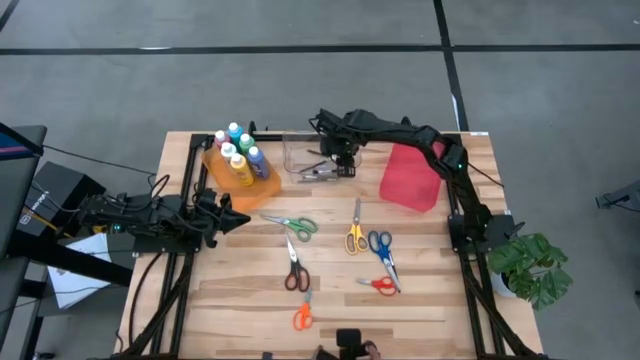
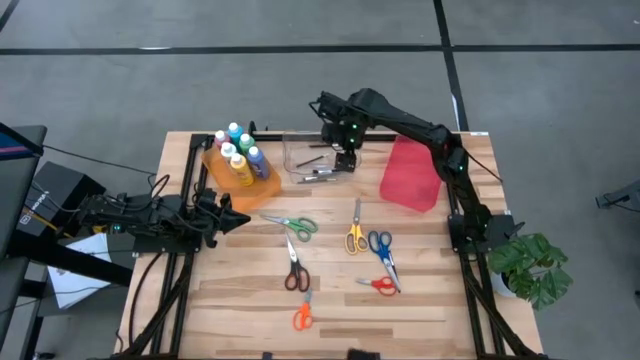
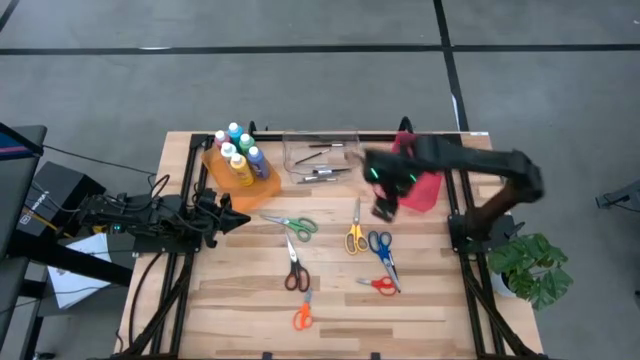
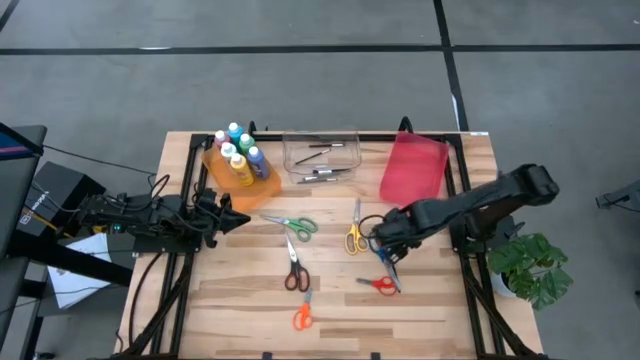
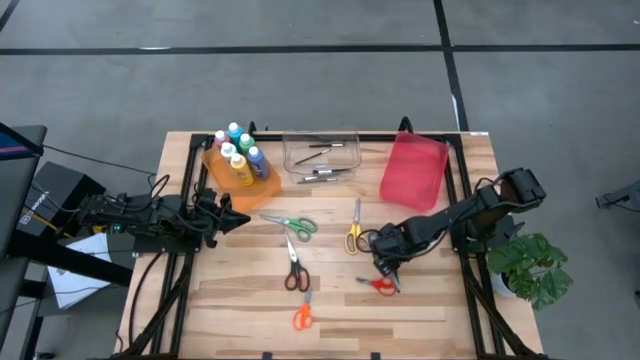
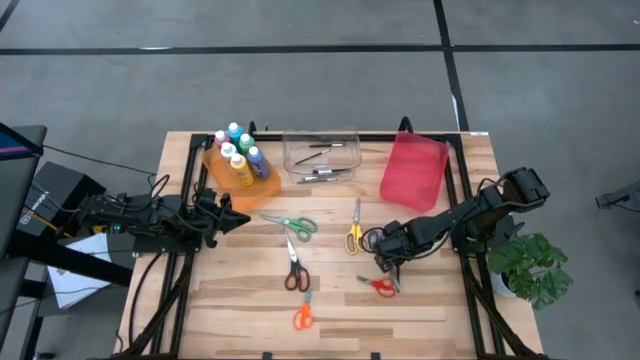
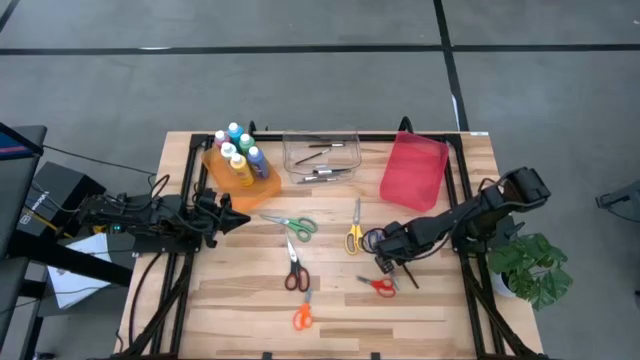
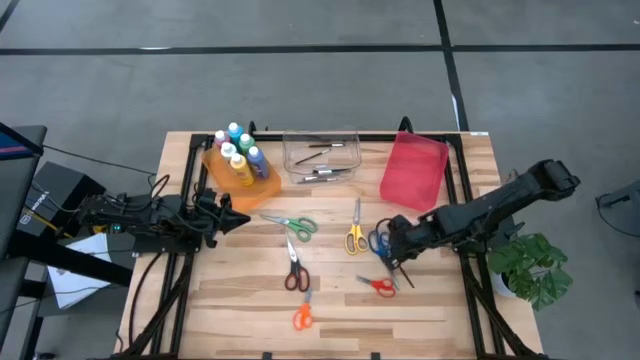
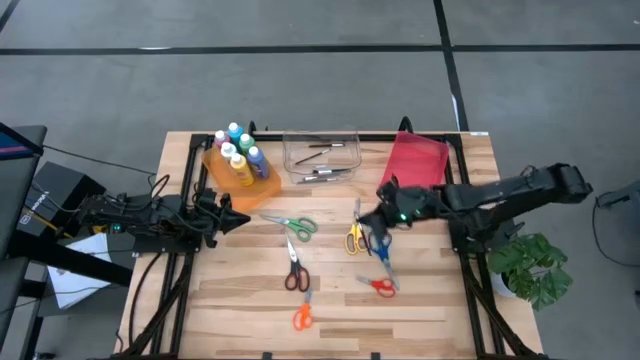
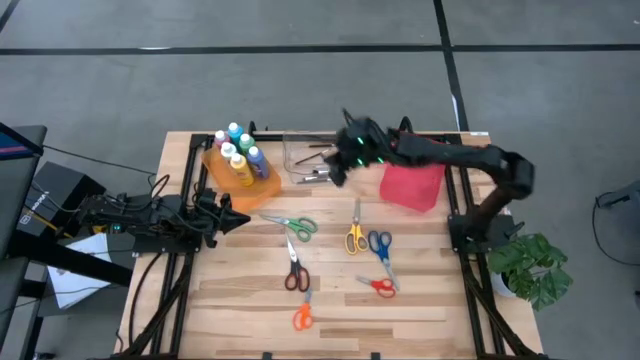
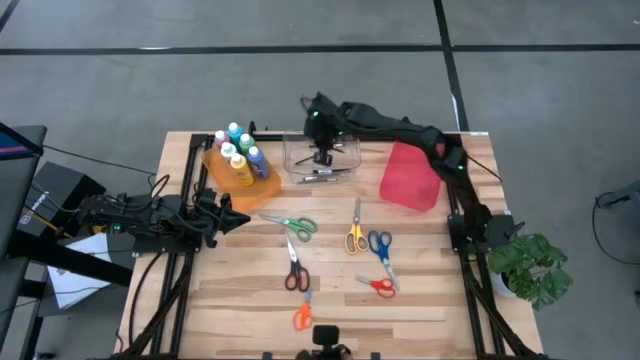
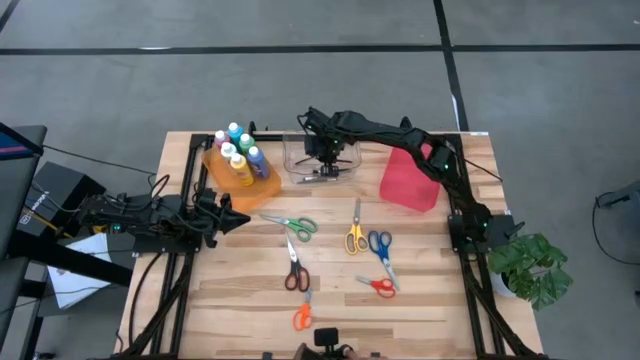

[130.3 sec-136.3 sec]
Task: Pick & Place Paint Supplies
Put the brush into the transparent container

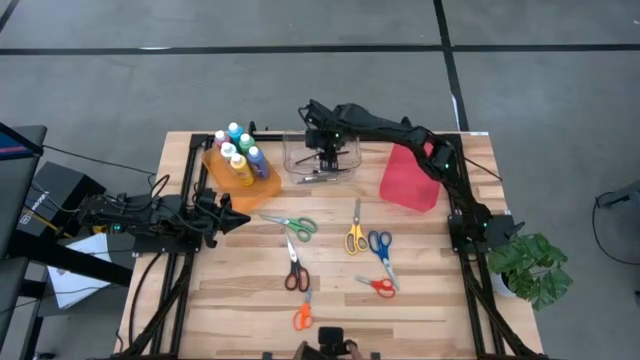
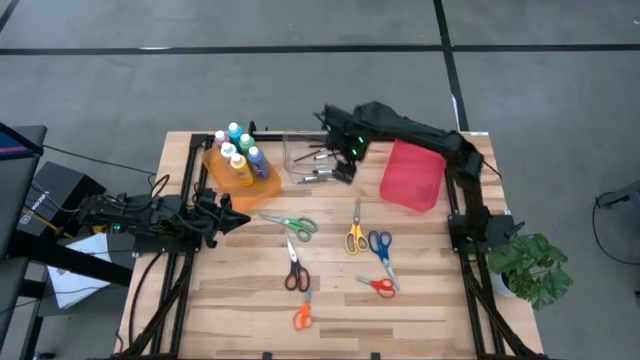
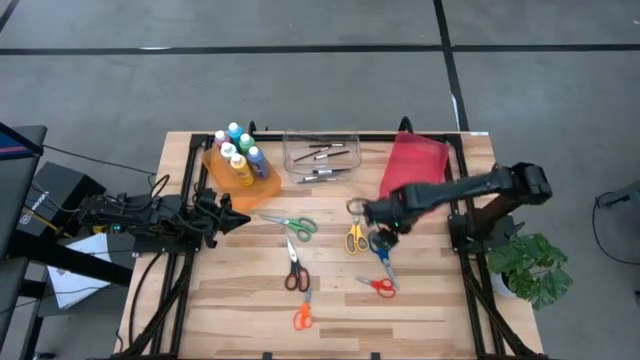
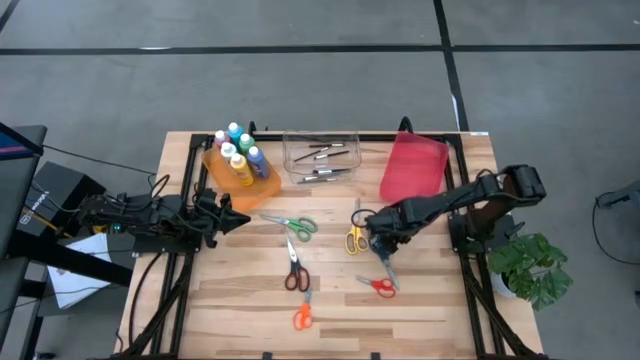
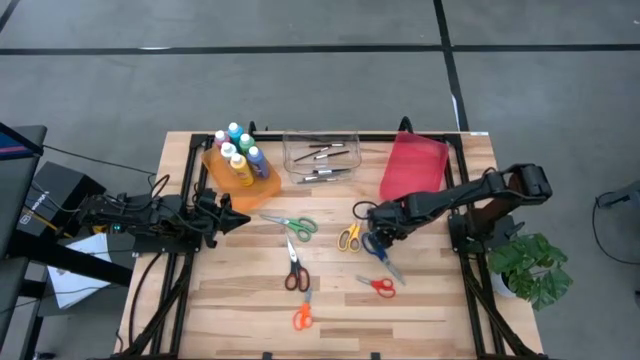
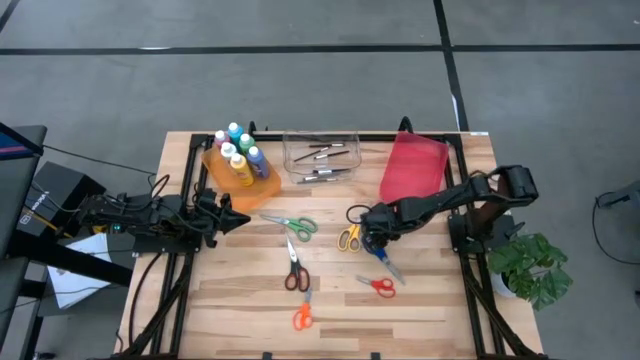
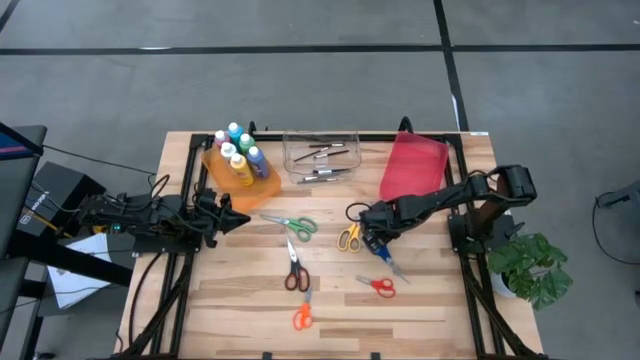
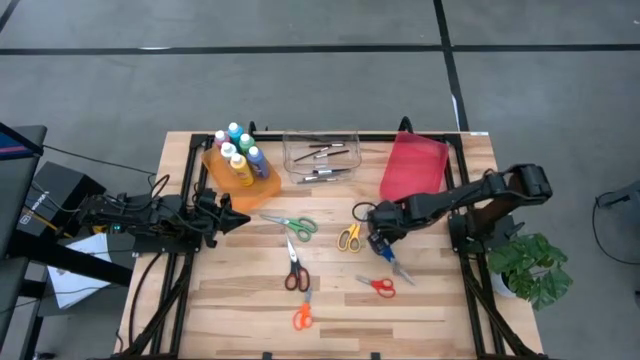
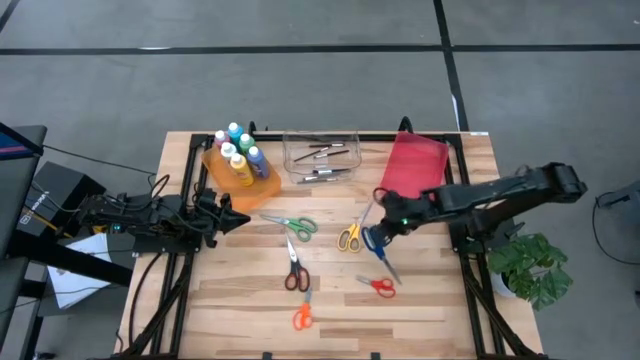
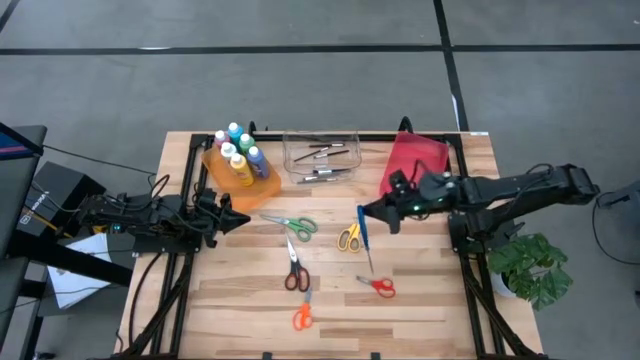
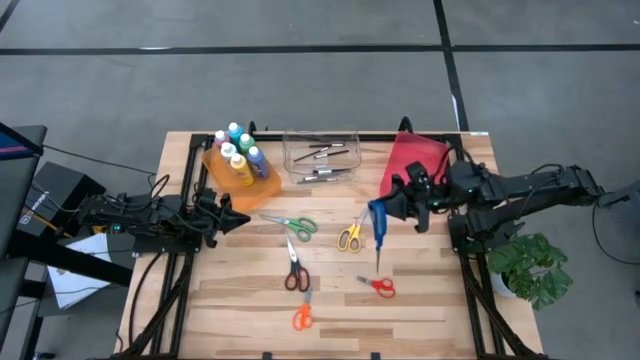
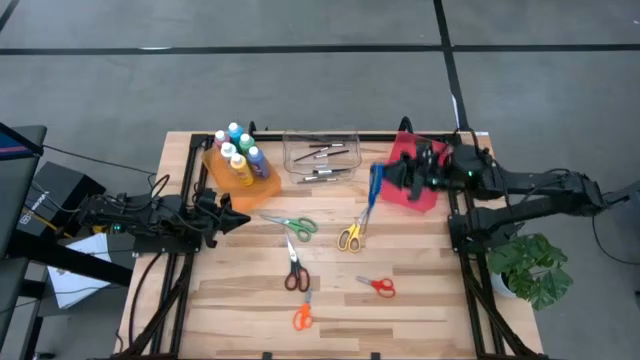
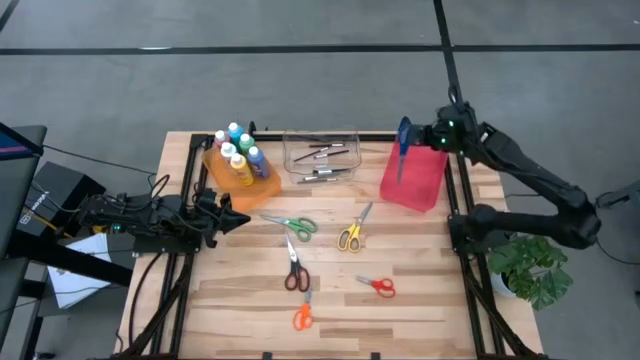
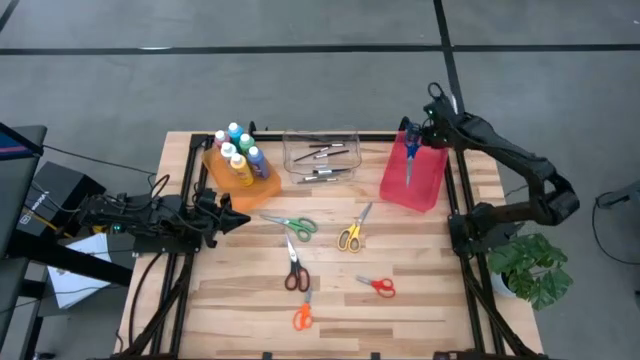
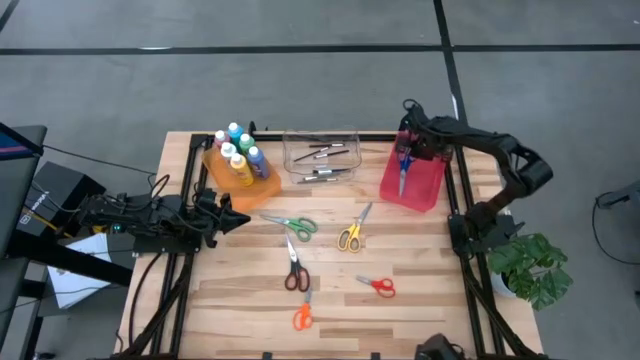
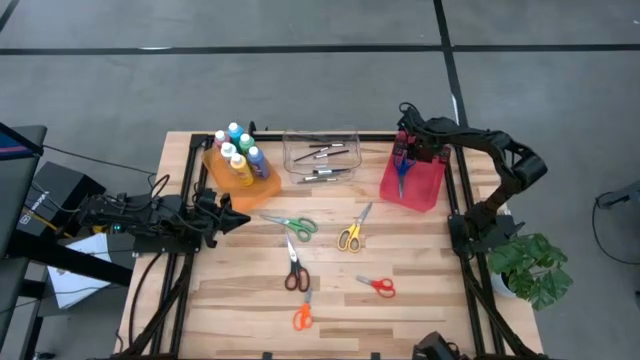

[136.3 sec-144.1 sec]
Put the blue scissor into the red bin

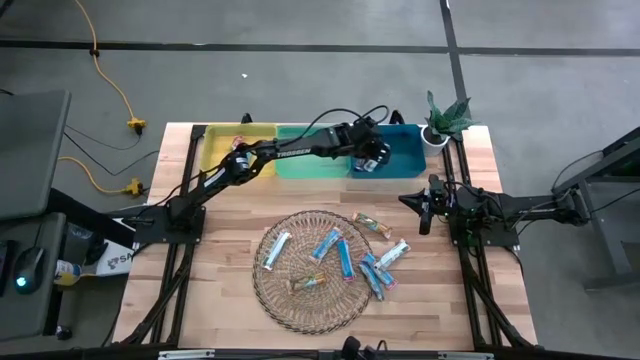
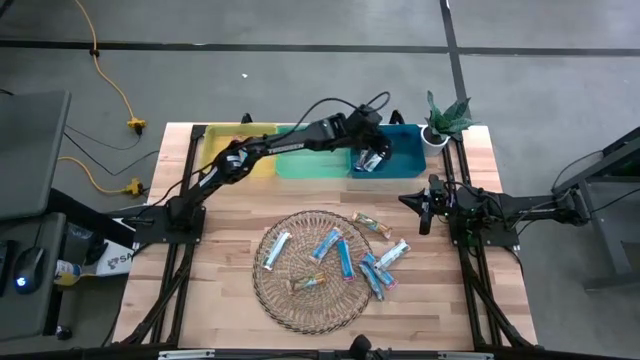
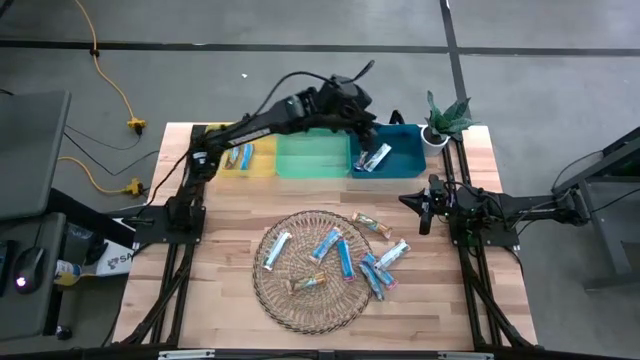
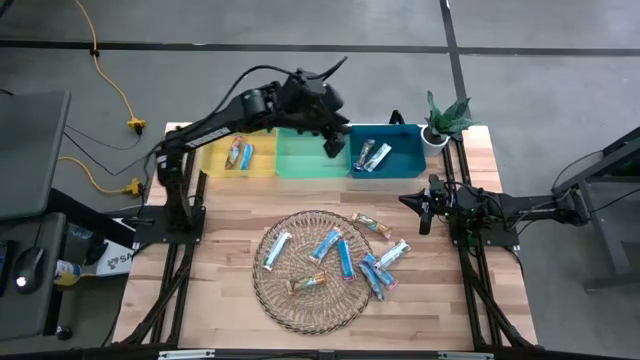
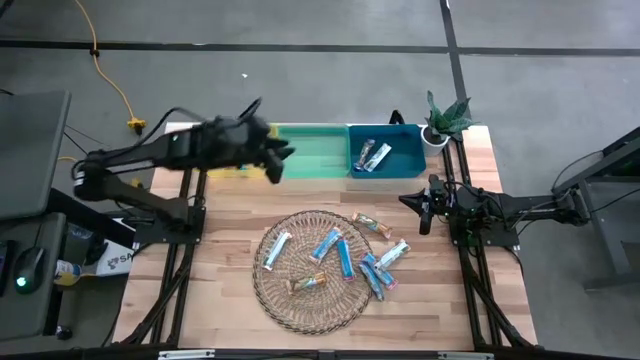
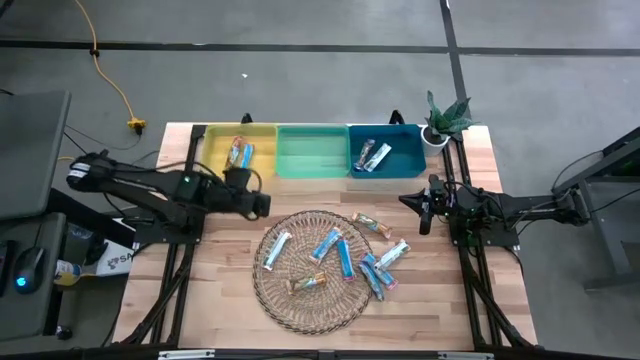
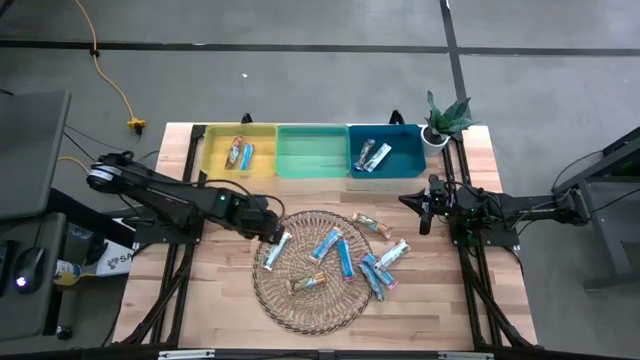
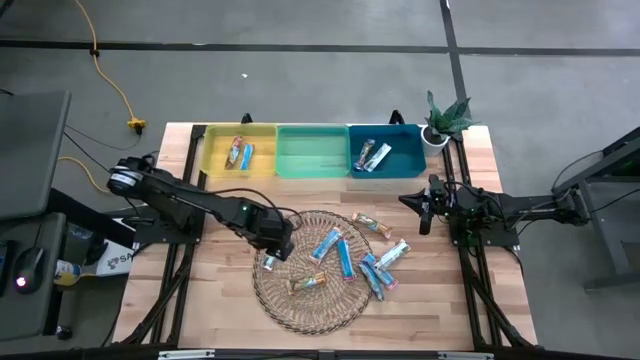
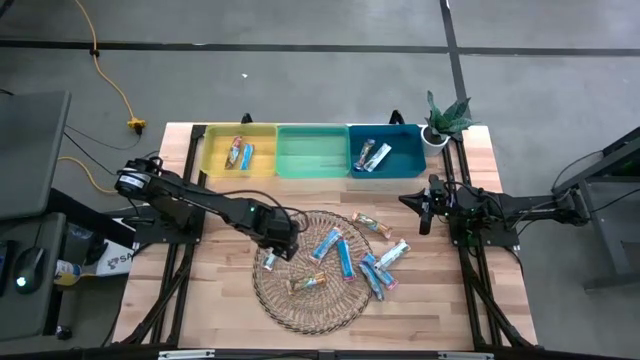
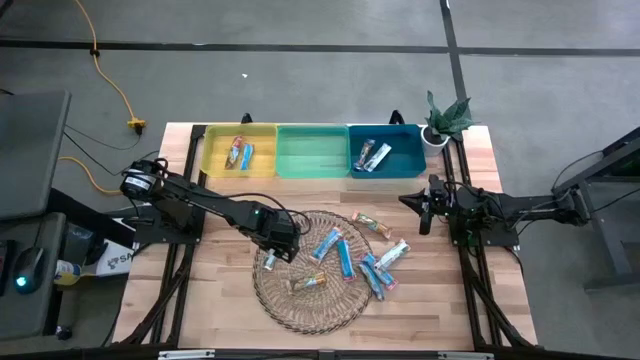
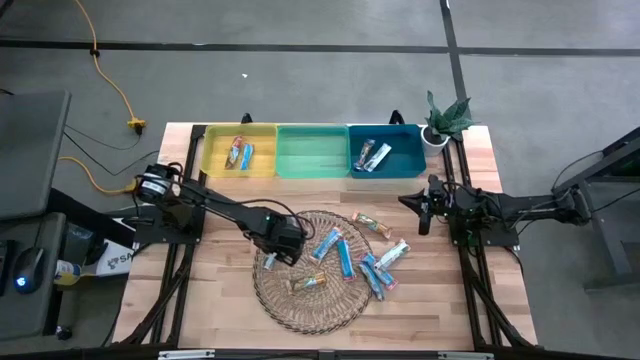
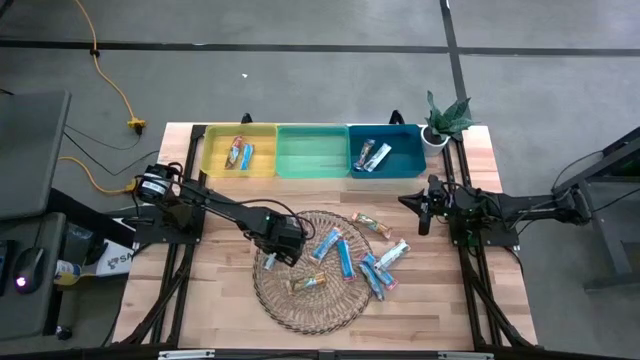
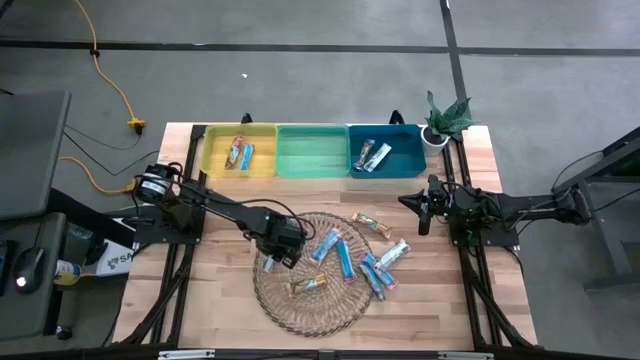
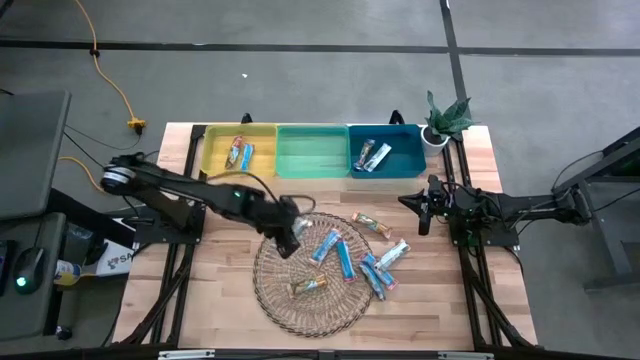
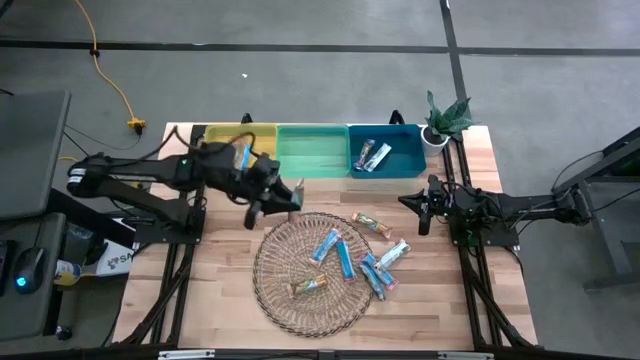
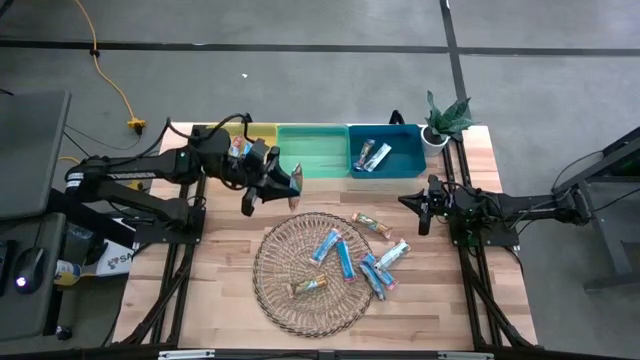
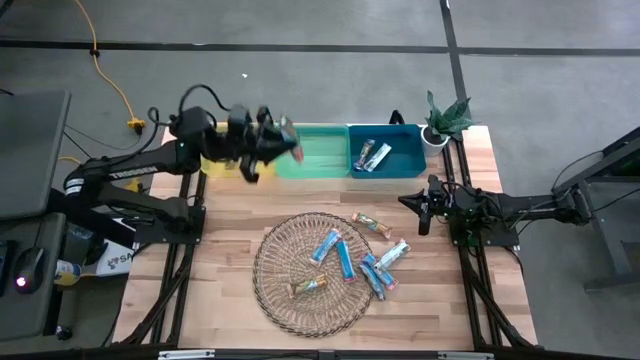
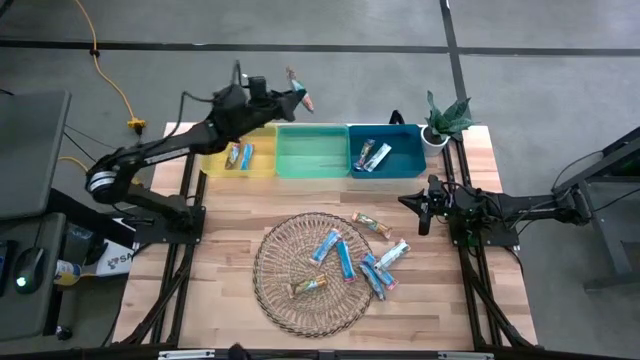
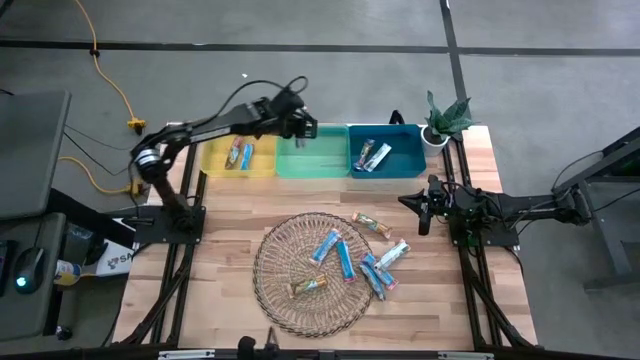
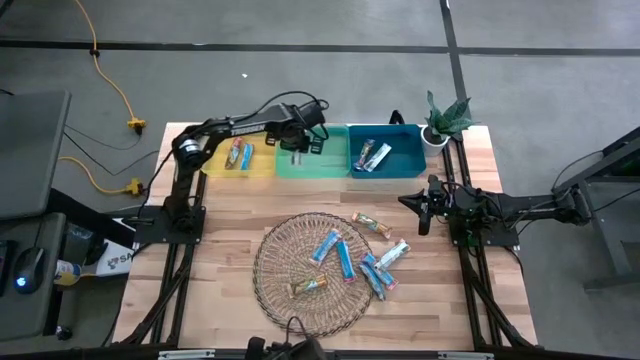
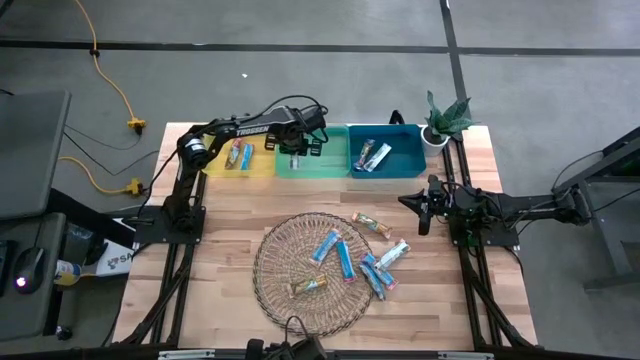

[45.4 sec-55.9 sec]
Task: Pick and place Granola Bars by type
Put the yellow granola bar into the green bin
